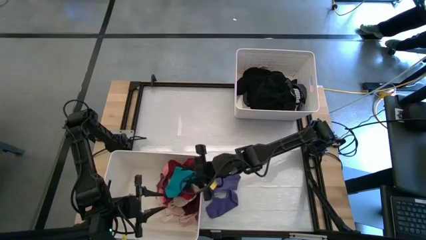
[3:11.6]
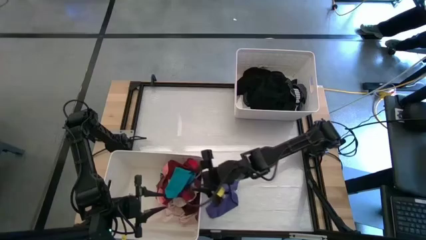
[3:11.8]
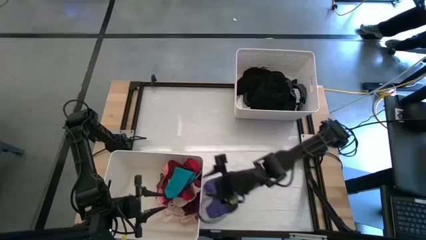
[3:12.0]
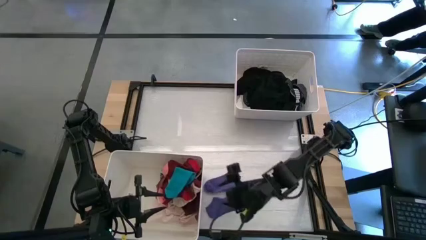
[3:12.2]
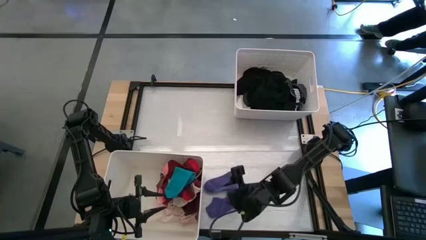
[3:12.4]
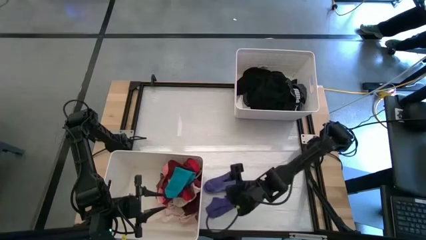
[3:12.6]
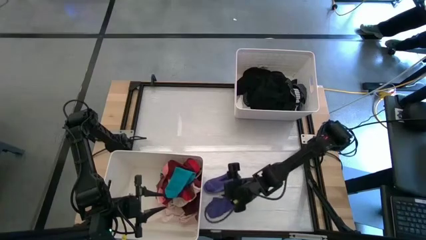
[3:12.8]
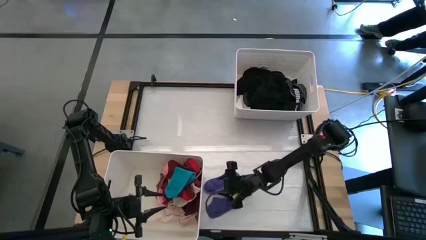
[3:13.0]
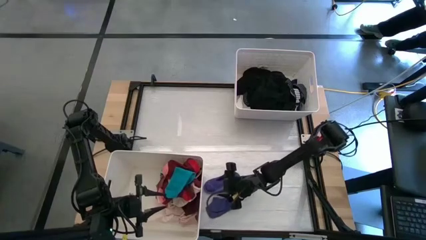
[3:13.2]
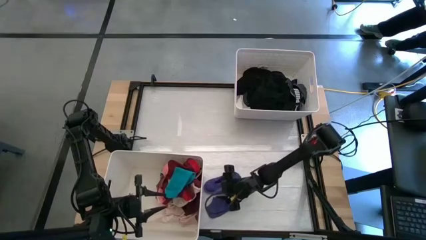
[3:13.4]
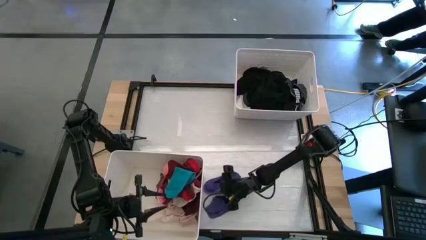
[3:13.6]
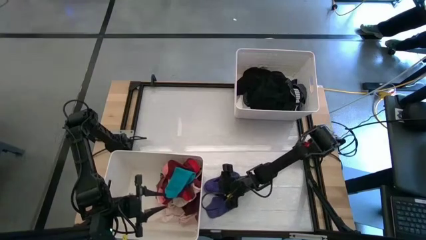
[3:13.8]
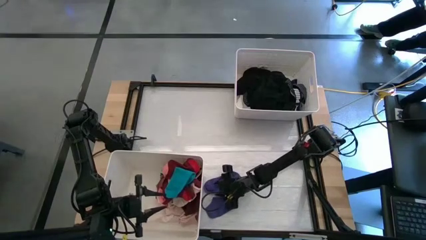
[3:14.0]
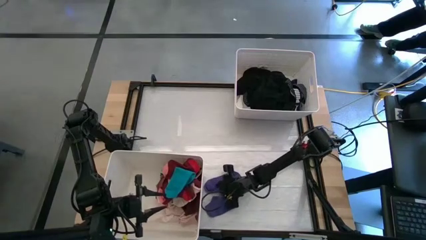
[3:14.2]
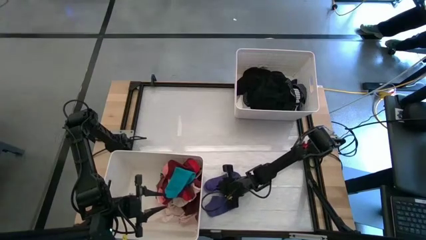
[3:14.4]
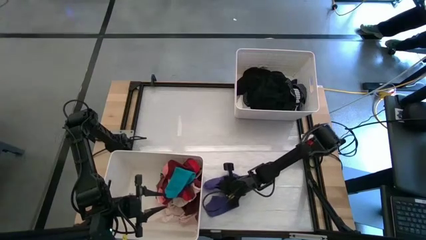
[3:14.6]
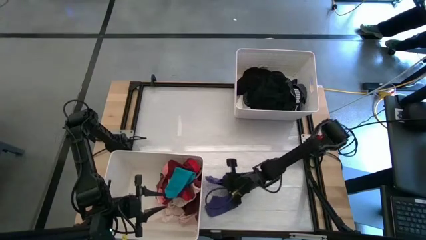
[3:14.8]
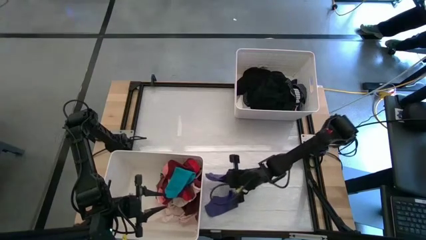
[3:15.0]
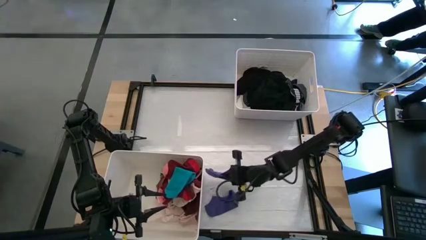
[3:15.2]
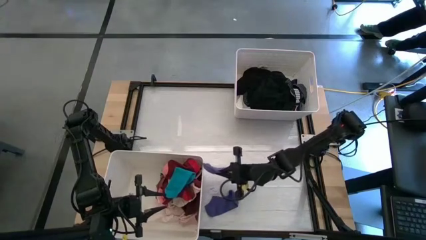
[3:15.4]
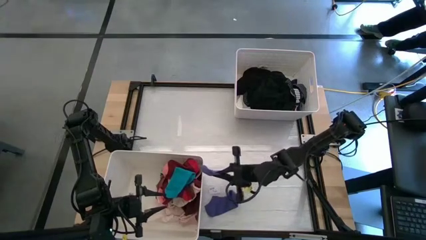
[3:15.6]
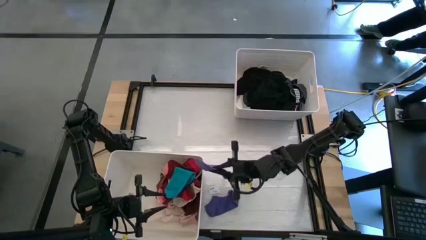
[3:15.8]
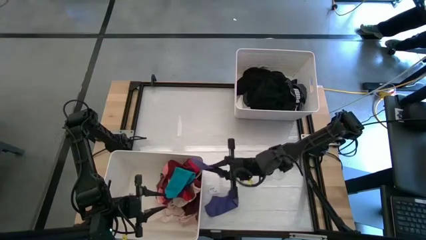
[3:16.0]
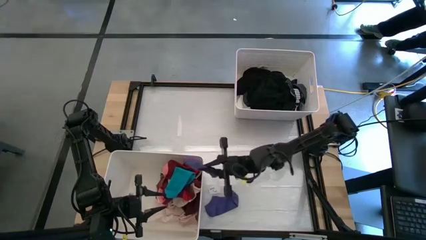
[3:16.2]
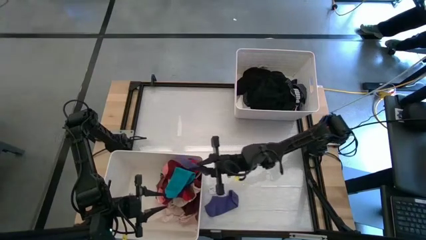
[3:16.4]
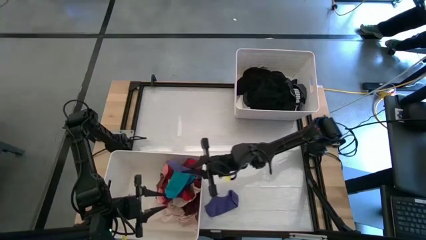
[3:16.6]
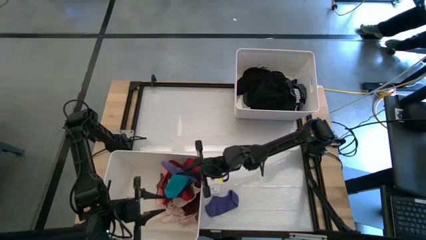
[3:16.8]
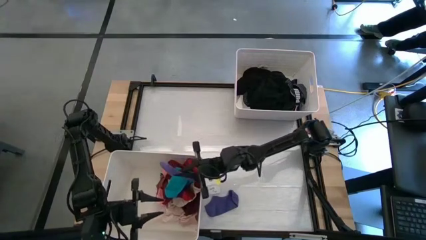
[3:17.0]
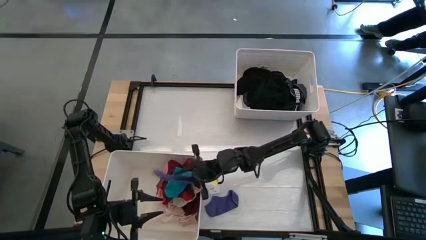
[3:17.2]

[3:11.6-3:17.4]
Task: Sort clothes
Put the violet sock into the bottom white laundry bin

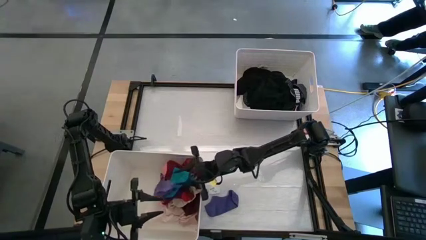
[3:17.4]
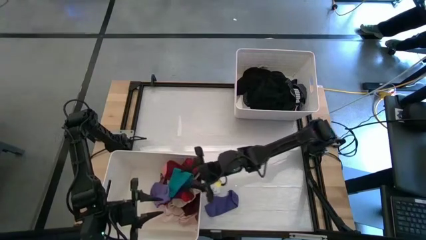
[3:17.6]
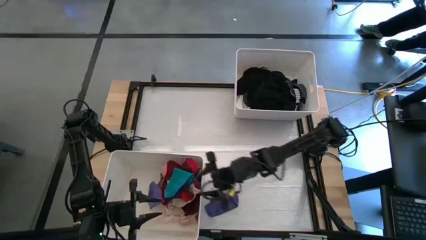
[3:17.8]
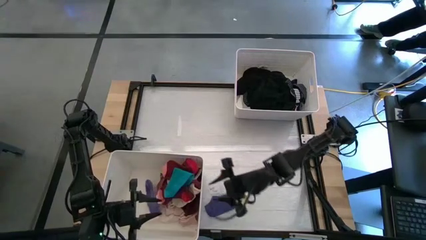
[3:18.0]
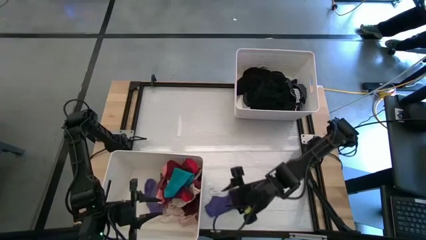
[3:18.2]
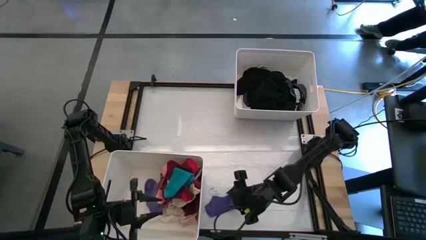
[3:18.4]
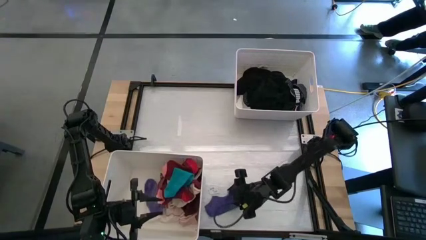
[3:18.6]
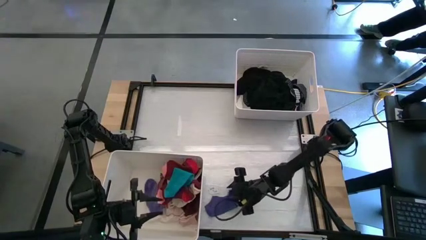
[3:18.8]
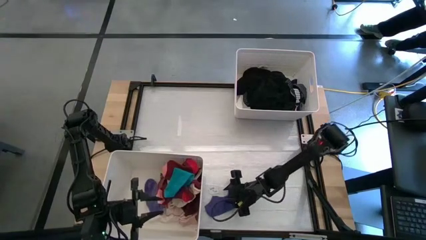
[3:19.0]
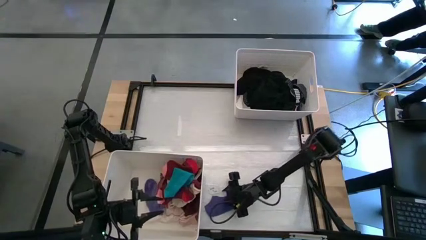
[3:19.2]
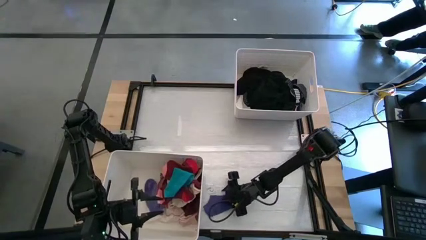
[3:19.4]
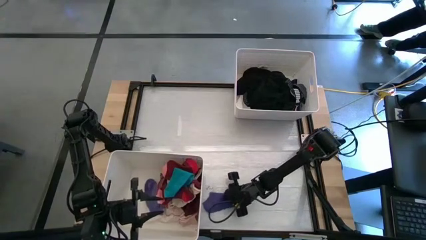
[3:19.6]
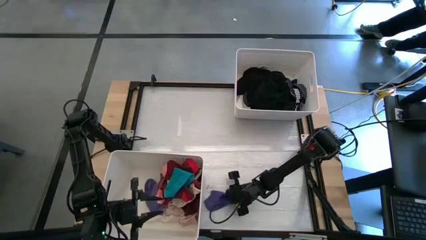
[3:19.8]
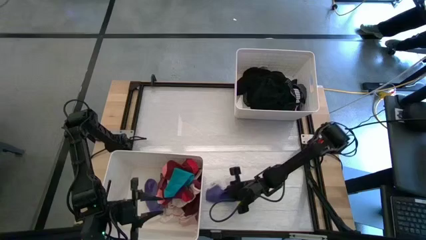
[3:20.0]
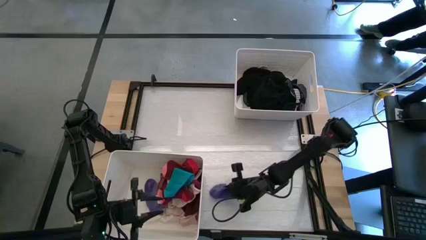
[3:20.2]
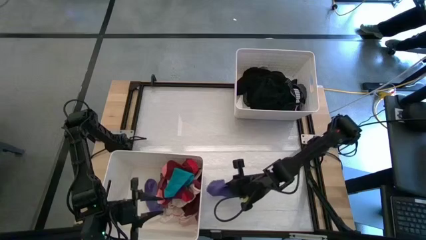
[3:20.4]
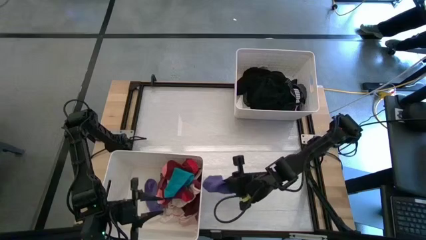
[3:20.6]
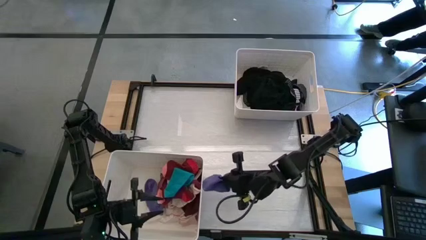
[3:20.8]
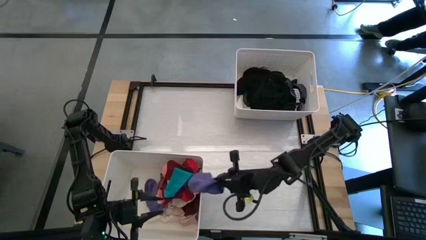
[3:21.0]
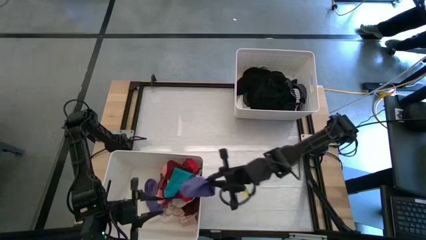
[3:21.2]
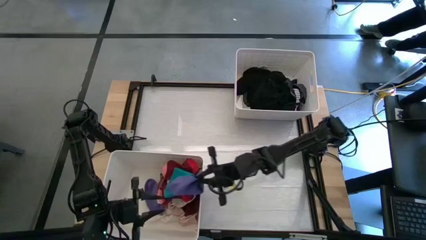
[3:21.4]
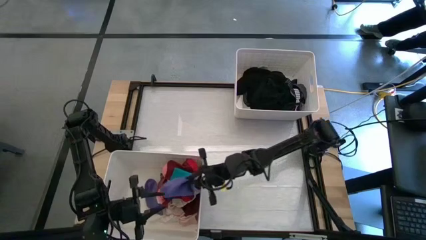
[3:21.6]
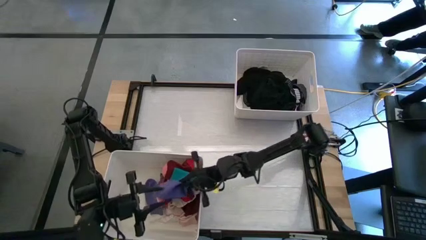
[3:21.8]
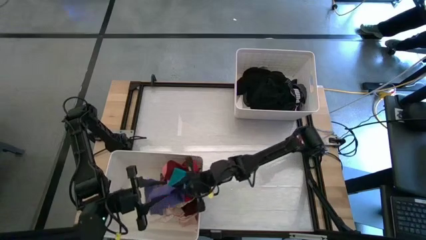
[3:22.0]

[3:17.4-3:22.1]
Put the violet sock into the bottom white laundry bin

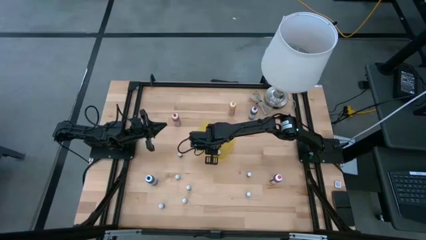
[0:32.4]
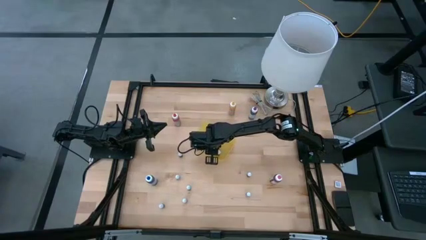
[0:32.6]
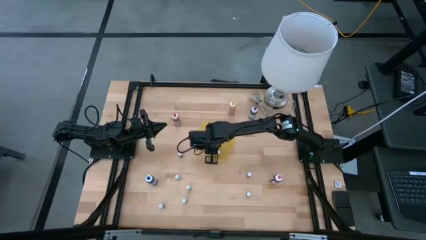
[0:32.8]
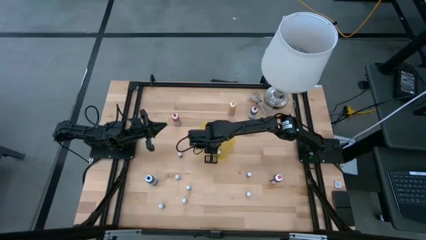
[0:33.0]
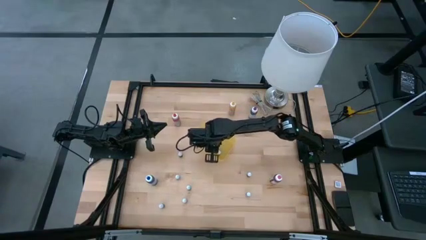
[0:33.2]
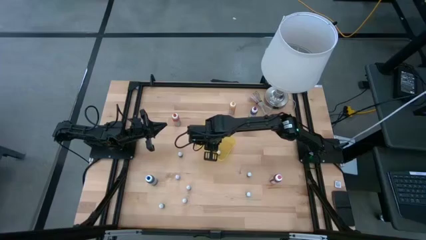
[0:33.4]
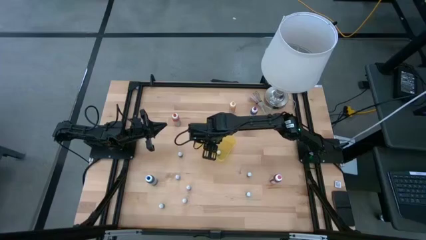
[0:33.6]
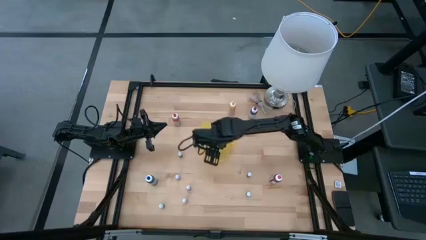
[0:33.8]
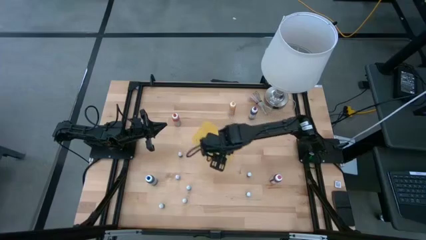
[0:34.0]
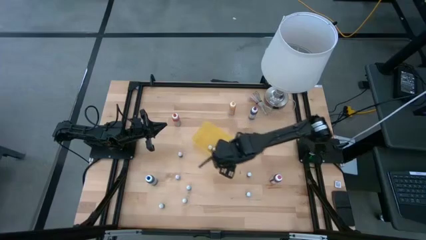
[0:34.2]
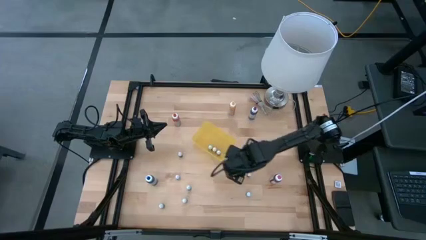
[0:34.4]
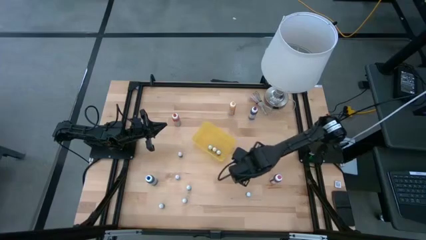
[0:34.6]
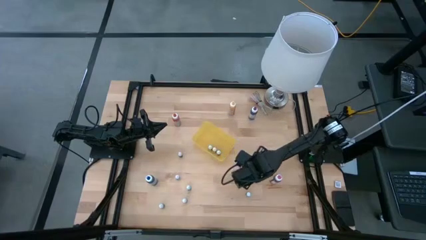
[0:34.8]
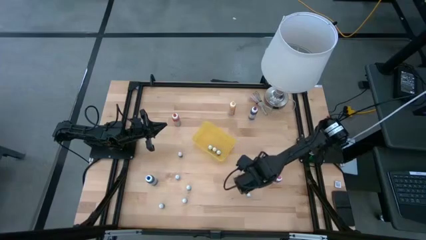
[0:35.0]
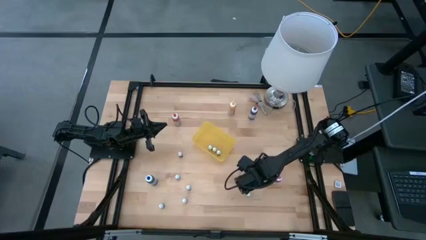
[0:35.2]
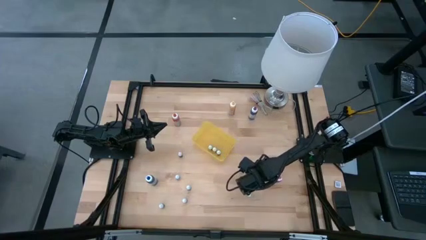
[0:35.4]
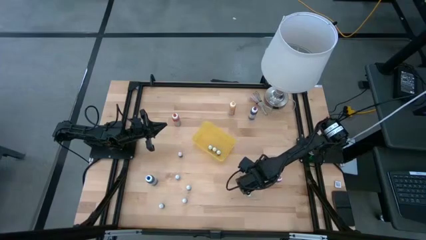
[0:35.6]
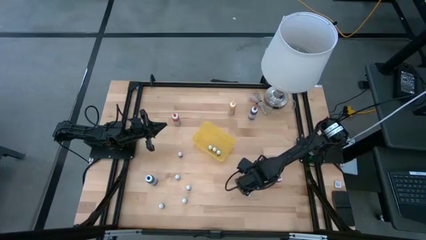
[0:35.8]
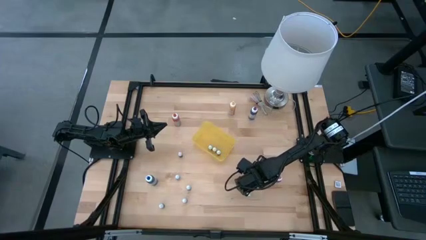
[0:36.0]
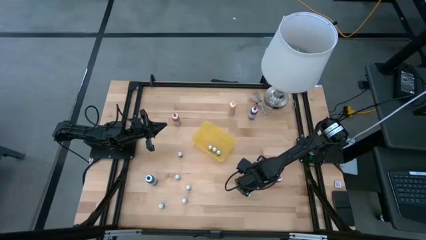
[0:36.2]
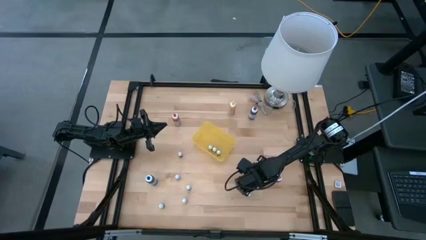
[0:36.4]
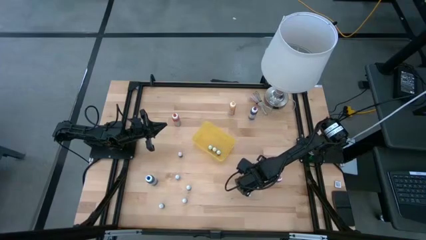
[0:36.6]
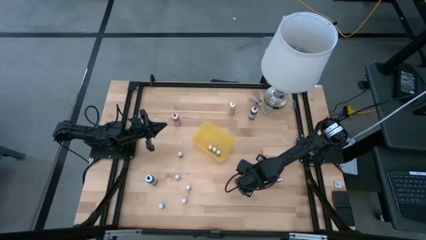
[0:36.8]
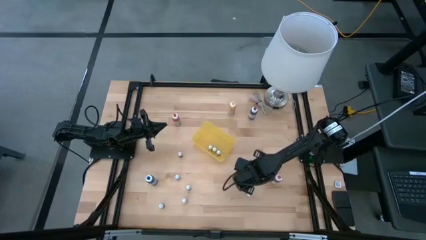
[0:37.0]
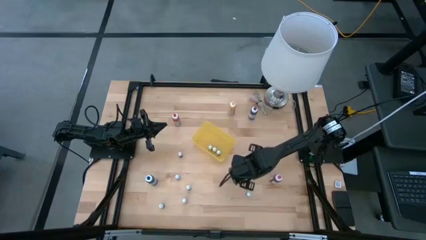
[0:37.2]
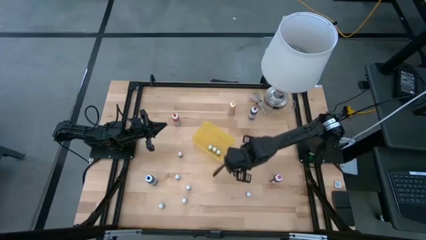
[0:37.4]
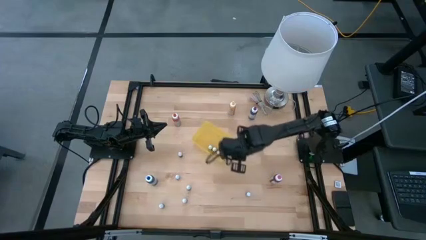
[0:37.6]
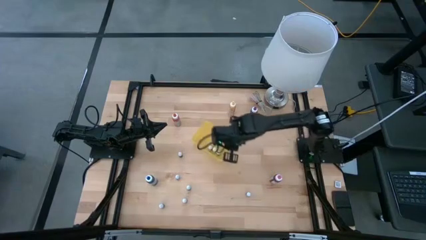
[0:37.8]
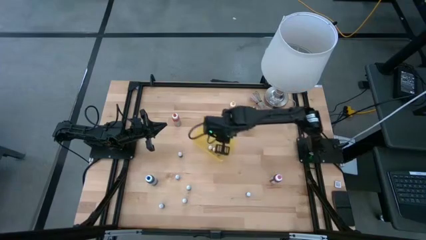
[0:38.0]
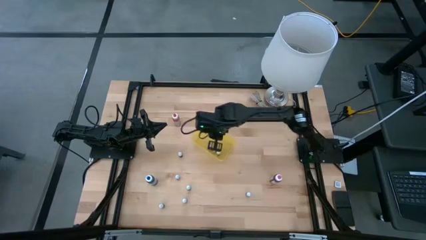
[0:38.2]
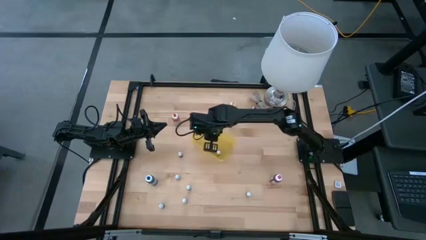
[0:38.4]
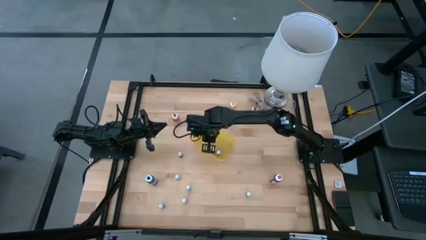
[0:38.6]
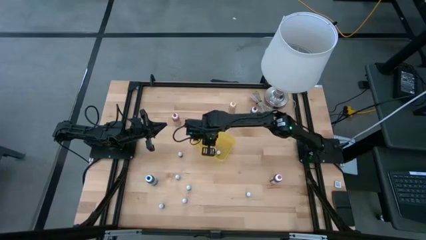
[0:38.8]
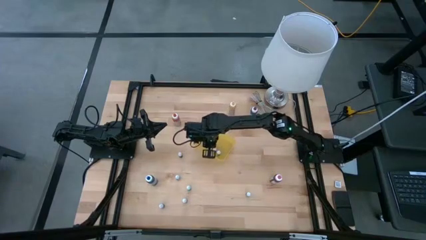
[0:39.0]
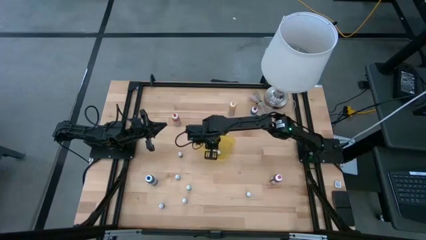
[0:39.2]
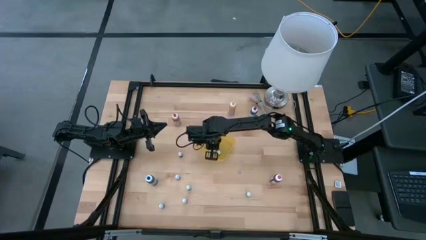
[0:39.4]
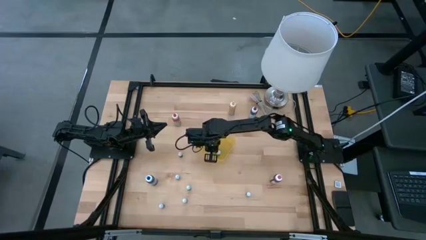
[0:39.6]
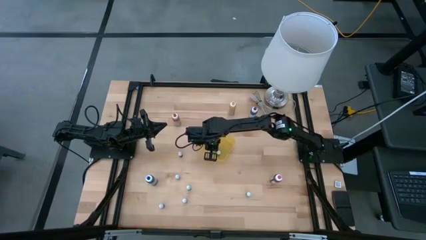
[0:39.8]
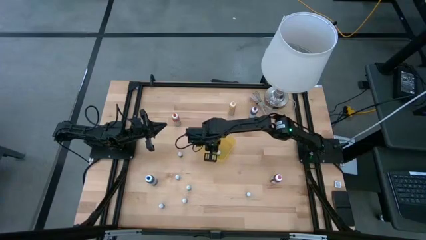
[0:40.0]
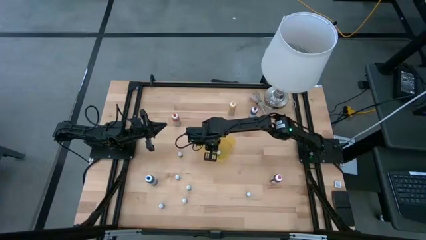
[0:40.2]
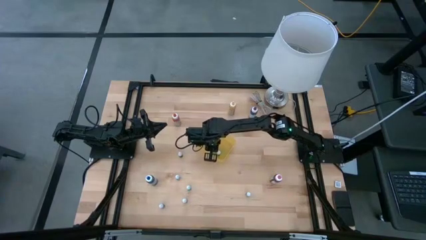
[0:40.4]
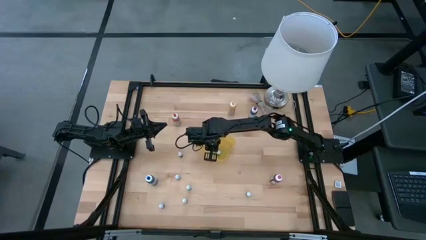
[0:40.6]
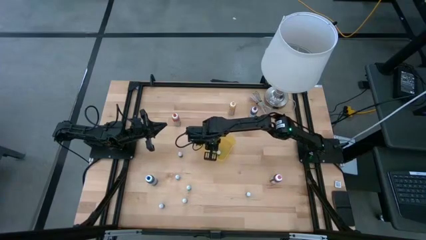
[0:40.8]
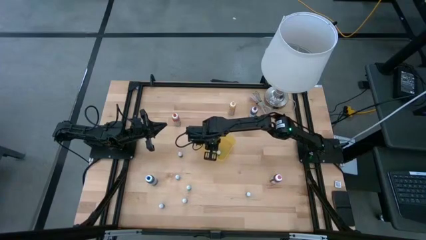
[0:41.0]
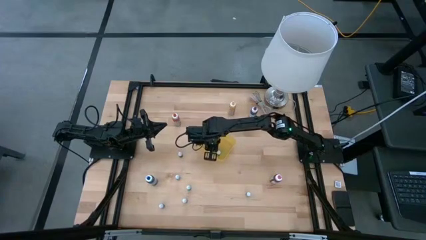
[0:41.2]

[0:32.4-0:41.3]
Task: Pick & Place food coloring
Put the small black food coloring bottle into the yellow bin
